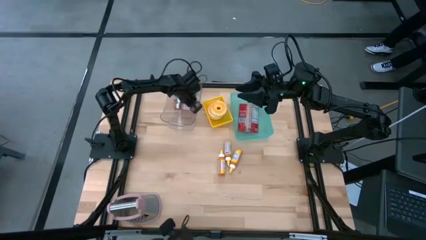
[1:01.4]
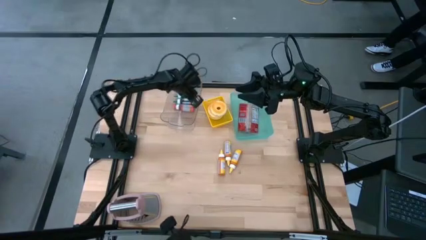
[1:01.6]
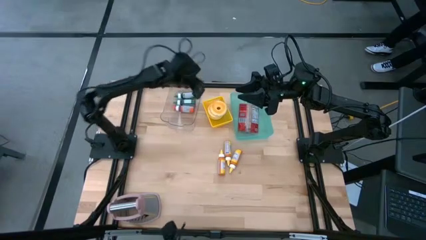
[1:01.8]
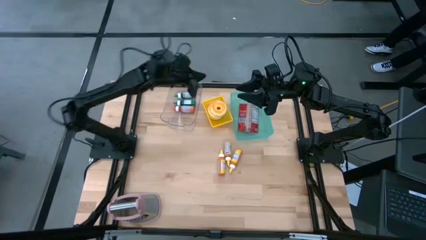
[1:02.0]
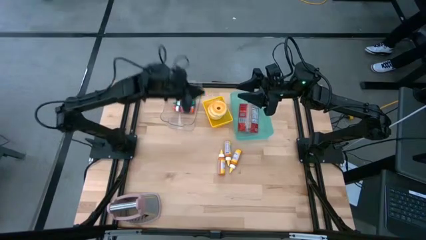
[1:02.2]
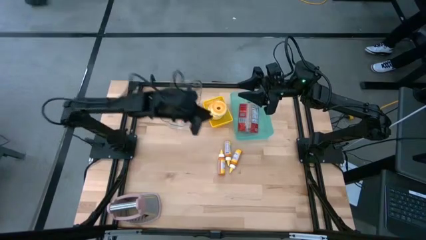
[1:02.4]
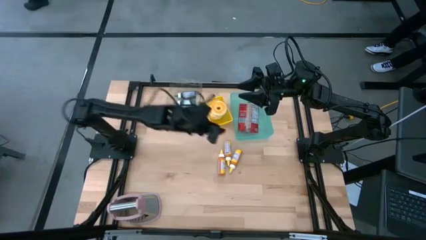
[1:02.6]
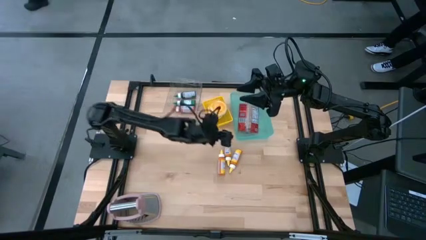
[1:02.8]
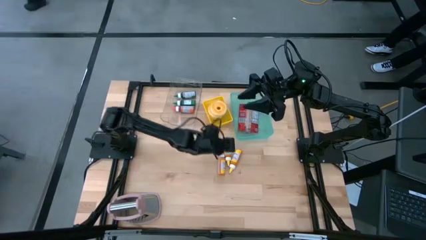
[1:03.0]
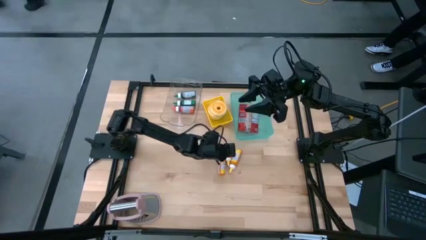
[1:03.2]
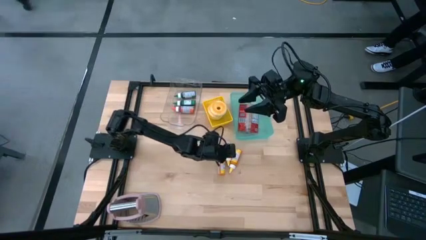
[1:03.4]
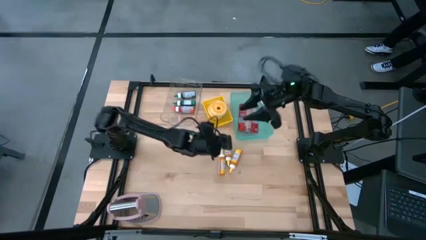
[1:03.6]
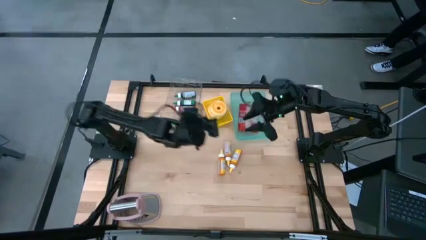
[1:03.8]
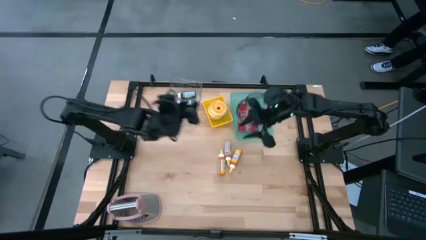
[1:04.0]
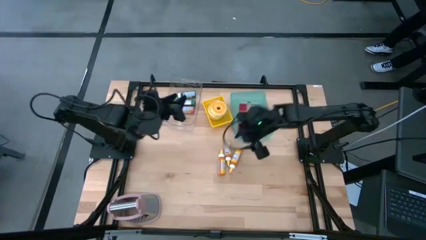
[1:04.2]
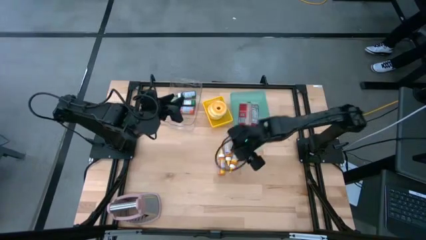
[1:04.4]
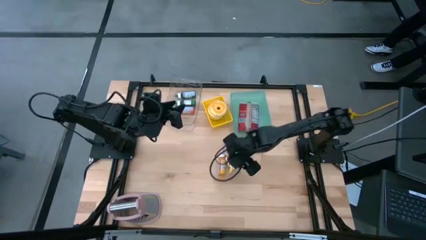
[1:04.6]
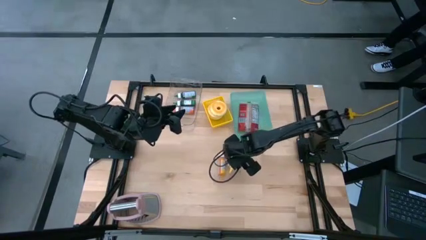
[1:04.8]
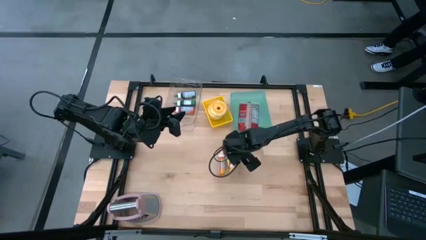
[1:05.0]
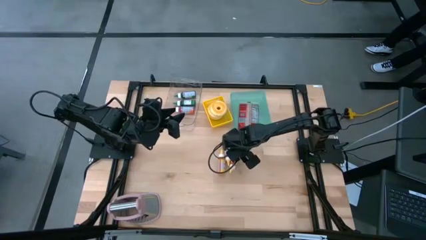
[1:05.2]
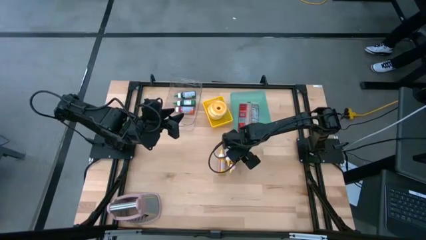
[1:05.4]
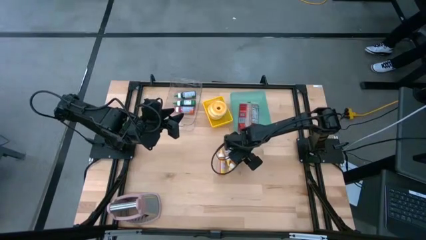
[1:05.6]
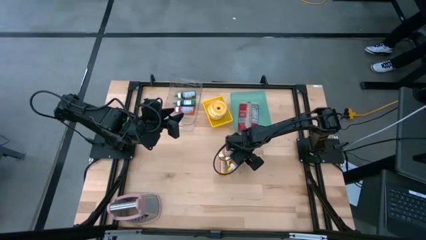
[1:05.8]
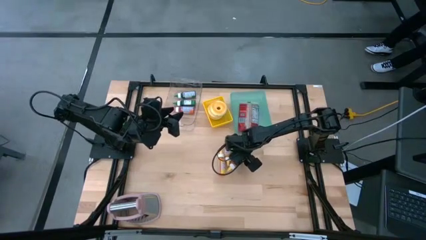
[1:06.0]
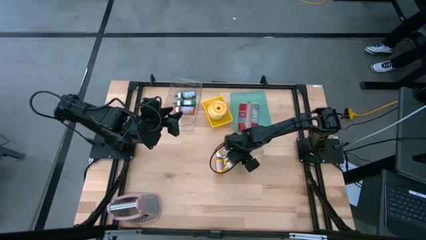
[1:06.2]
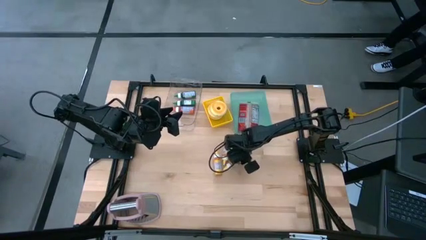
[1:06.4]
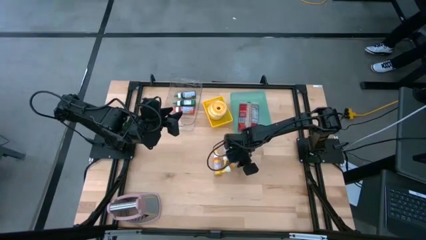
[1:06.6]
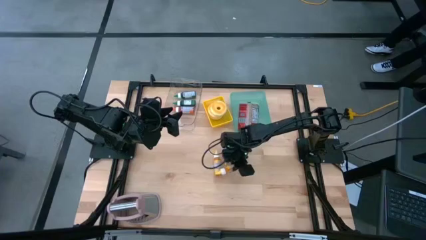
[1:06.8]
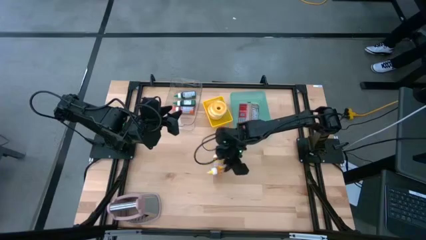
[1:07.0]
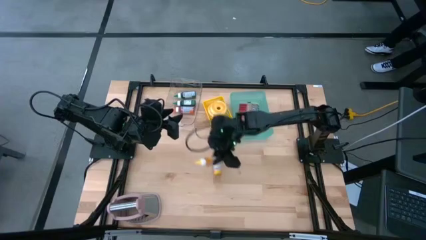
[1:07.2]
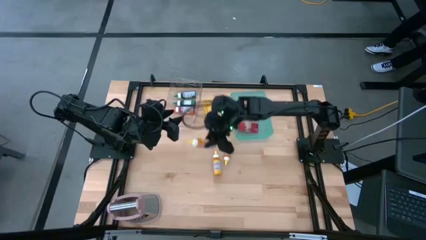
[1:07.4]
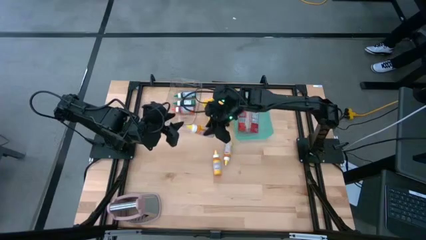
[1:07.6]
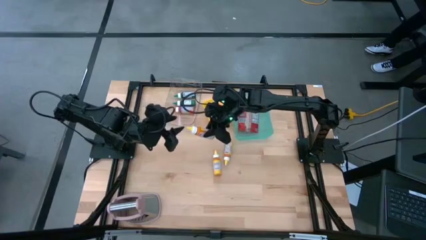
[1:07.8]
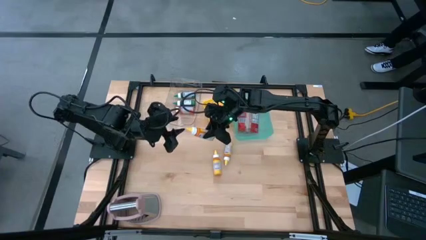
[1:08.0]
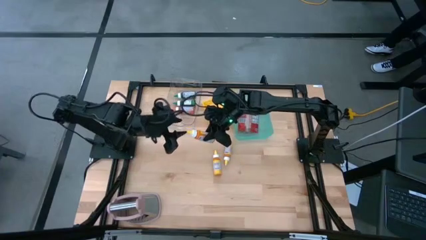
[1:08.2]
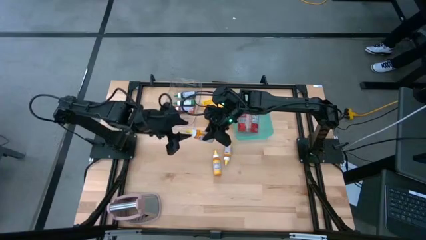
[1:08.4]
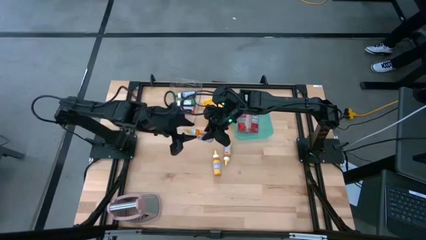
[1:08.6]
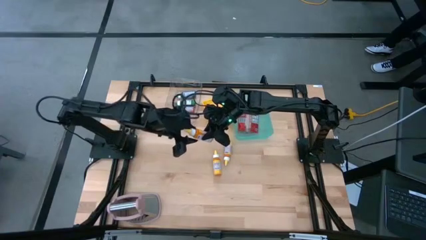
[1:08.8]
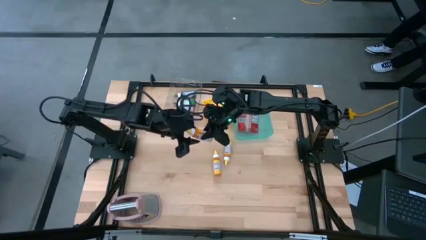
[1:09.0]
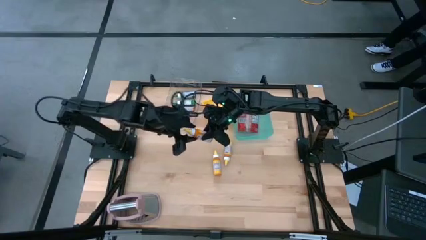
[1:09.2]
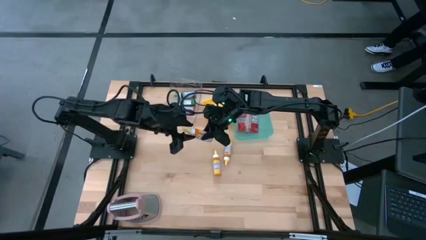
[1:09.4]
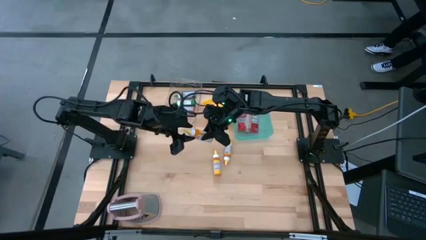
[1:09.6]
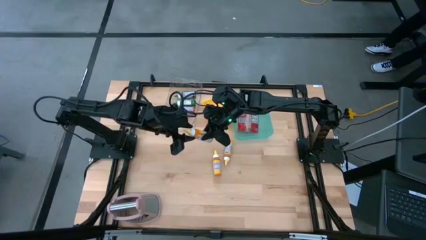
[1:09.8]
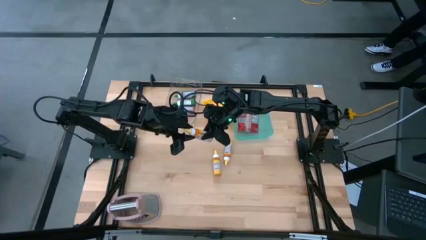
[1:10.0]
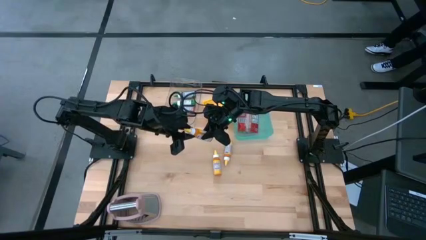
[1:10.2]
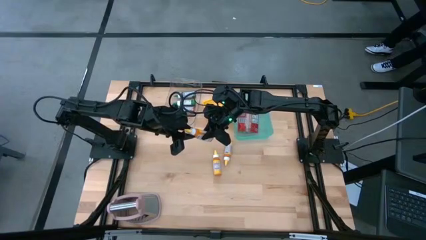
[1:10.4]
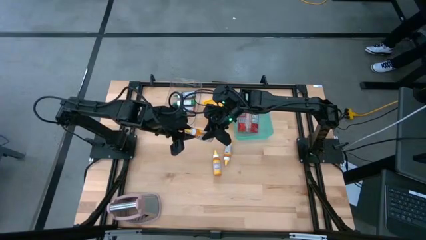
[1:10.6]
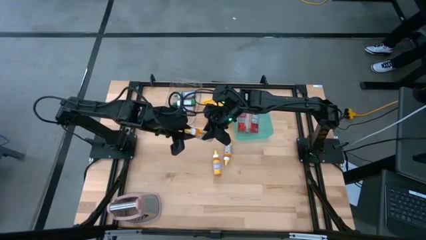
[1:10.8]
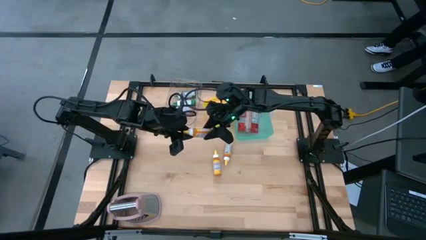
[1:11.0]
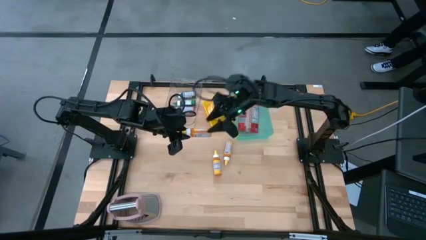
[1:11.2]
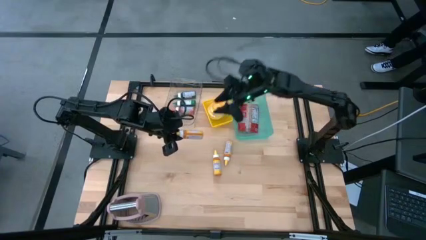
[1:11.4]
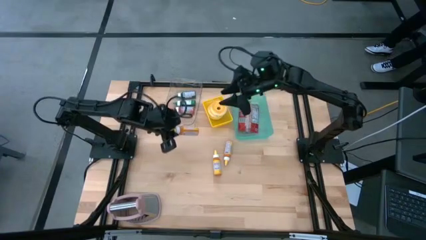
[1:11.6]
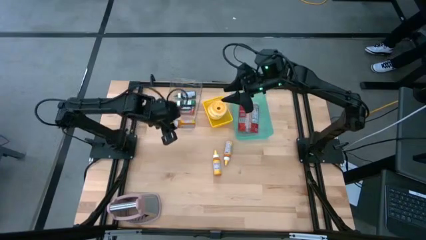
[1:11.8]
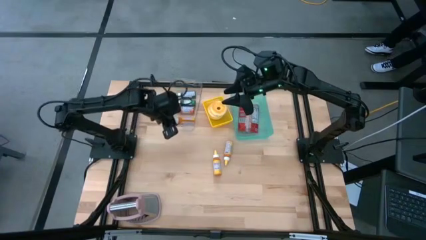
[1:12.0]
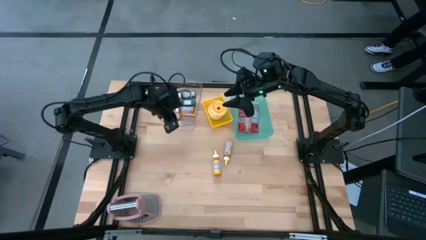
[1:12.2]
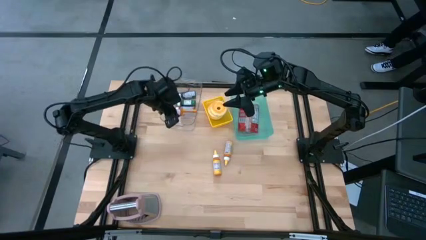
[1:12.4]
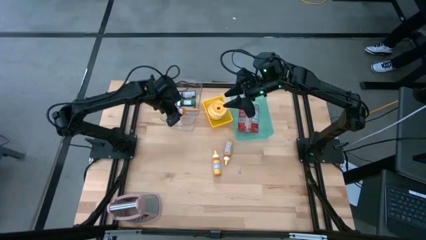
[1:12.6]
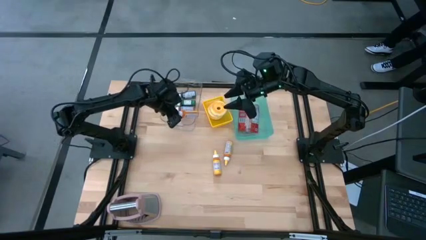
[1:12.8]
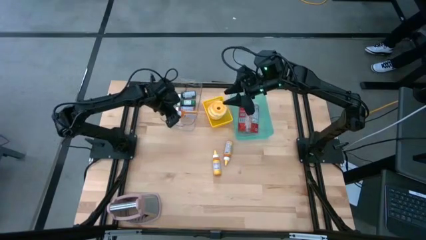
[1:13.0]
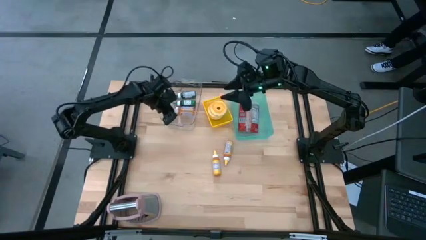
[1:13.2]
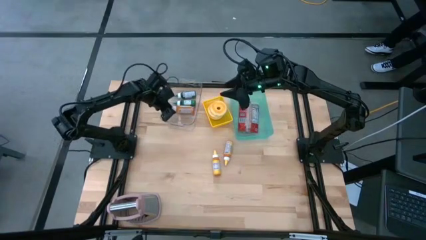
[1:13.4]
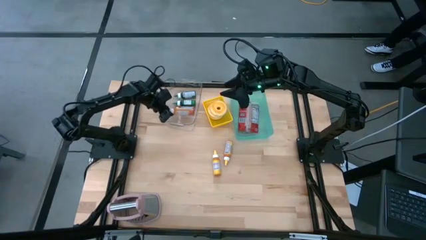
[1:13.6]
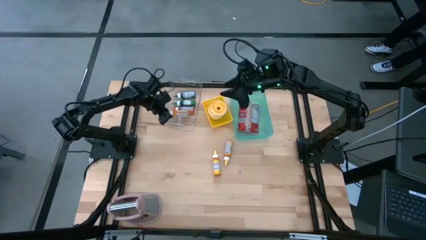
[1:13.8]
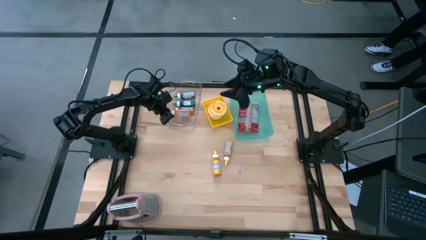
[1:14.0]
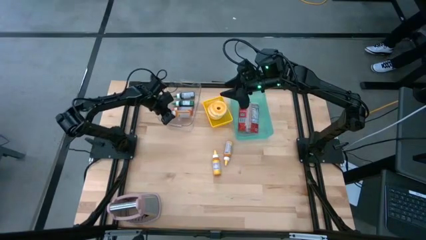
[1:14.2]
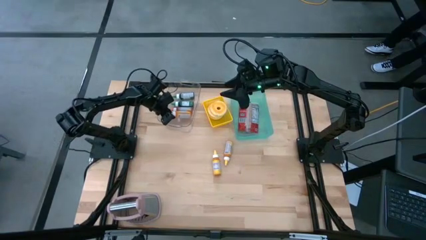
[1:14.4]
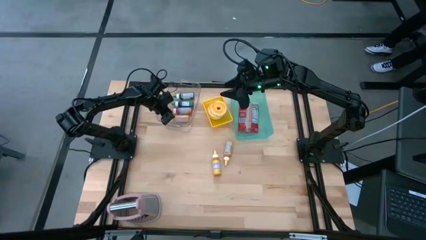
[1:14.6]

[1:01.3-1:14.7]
Put the right yellow food coloring bottle into the transparent bin

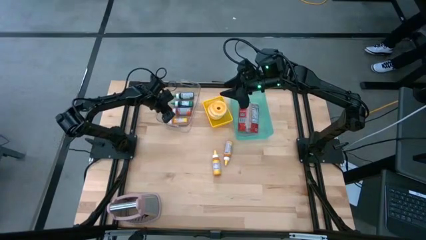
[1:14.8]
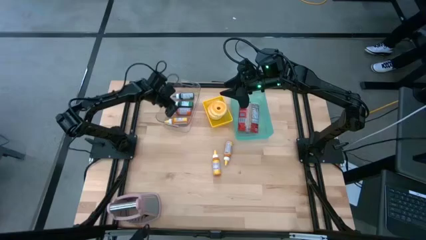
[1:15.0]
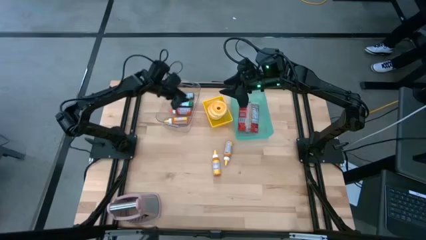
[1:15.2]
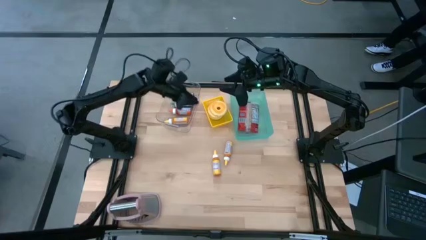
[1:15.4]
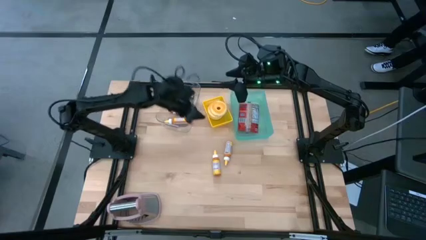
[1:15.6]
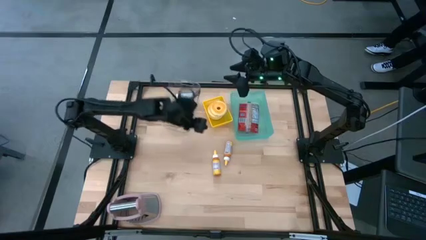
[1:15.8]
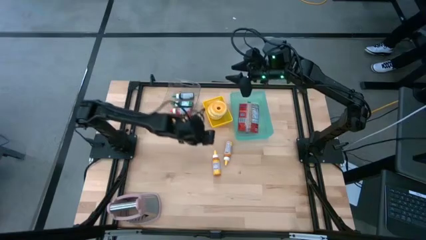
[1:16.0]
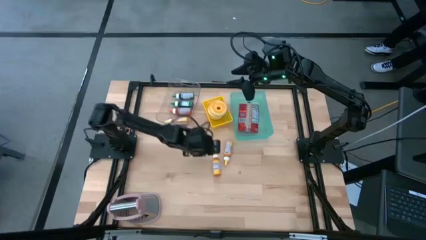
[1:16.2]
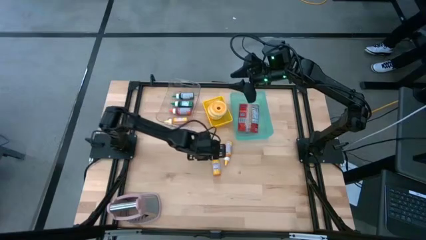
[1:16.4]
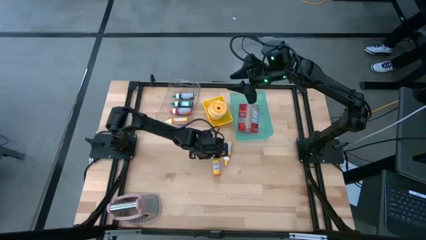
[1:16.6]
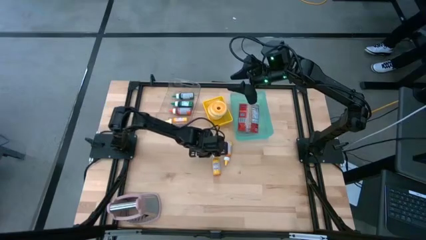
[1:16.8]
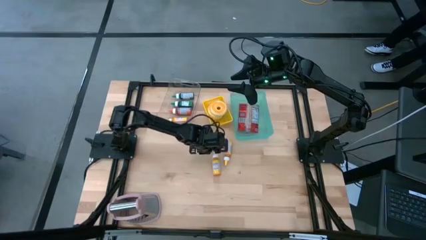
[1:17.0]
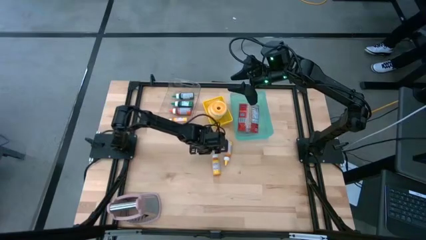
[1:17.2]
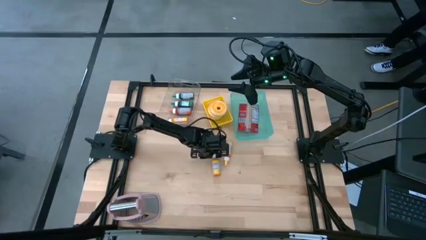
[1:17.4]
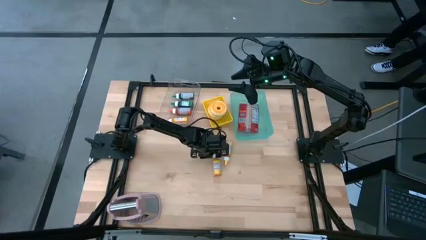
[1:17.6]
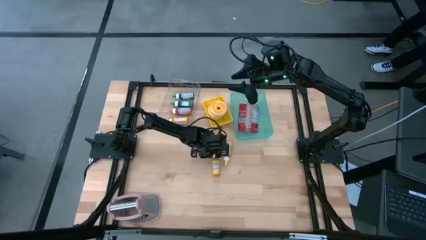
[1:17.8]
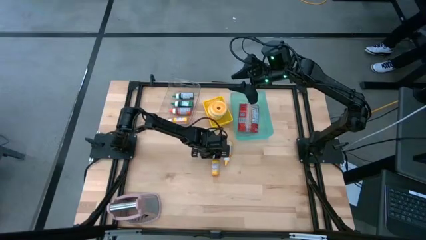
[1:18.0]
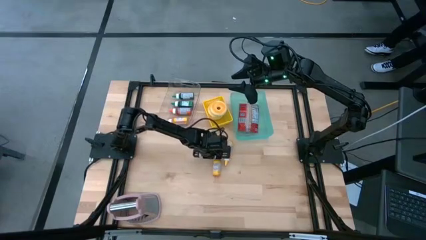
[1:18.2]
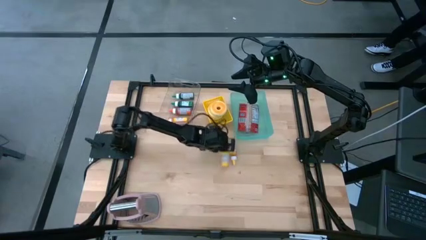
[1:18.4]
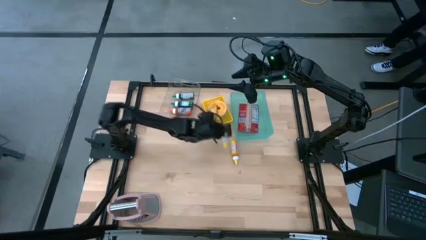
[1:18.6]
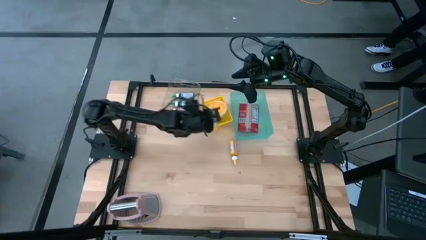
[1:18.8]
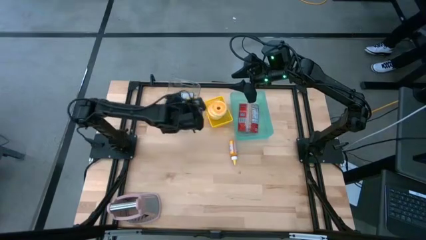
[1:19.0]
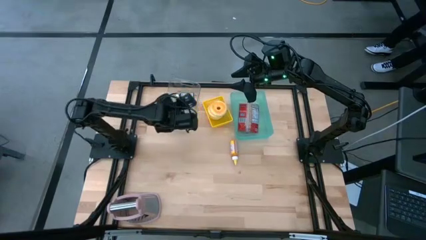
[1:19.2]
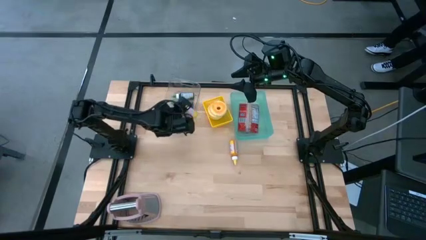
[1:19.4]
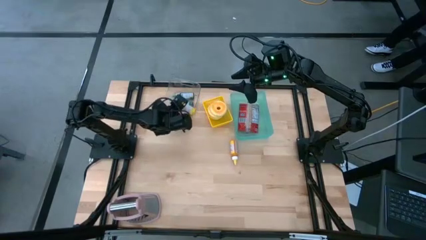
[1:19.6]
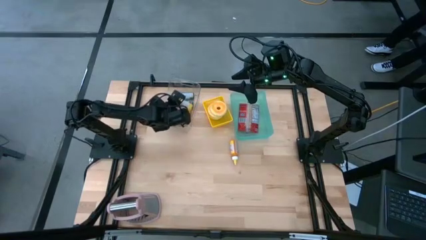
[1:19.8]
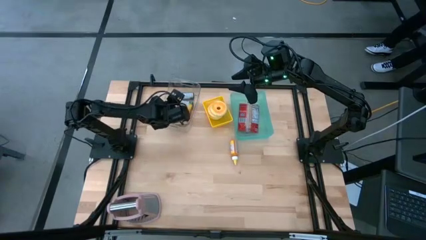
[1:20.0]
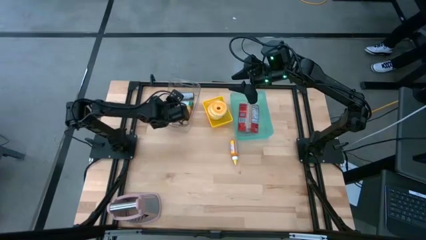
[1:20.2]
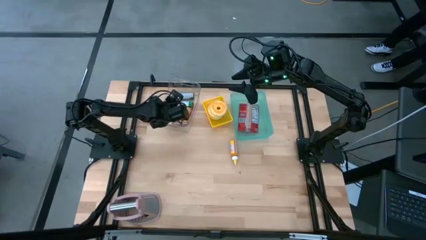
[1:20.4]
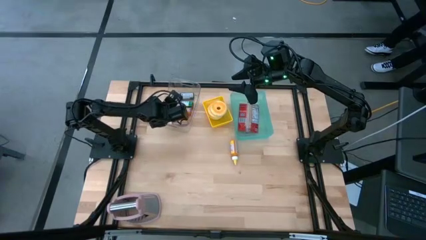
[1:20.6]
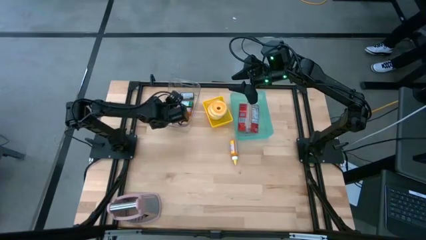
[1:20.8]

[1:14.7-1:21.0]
Put the left yellow food coloring bottle into the transparent bin
